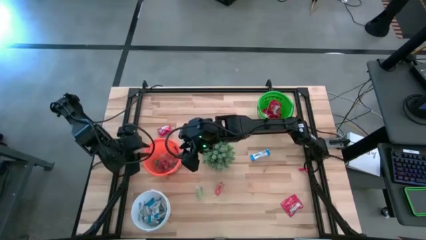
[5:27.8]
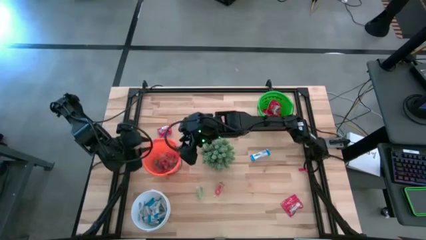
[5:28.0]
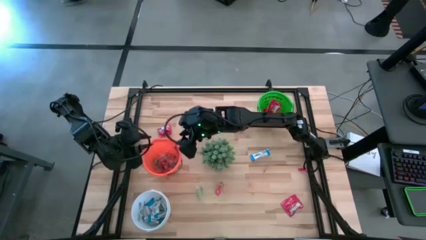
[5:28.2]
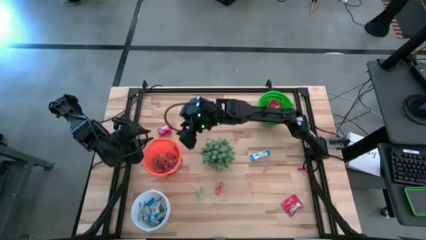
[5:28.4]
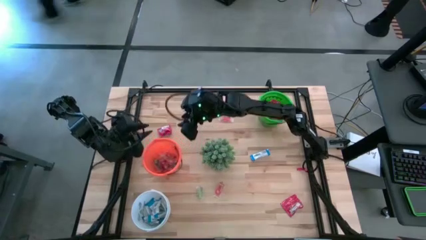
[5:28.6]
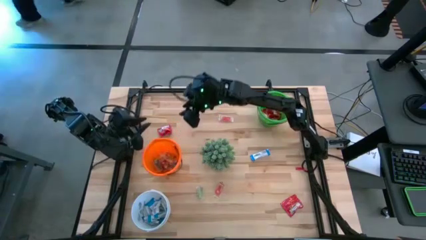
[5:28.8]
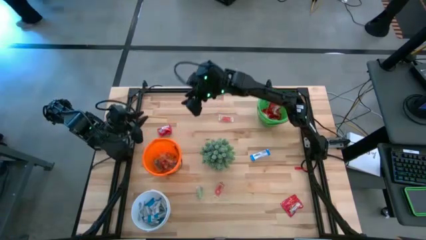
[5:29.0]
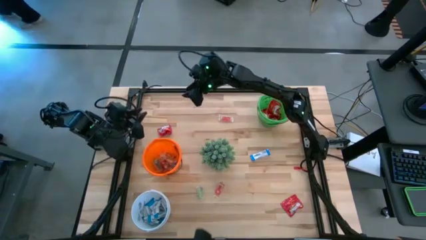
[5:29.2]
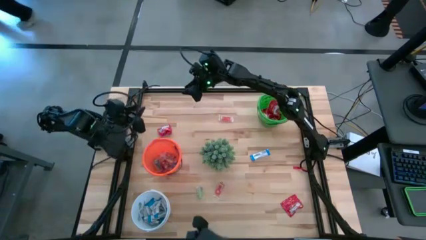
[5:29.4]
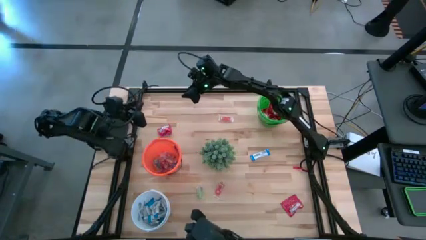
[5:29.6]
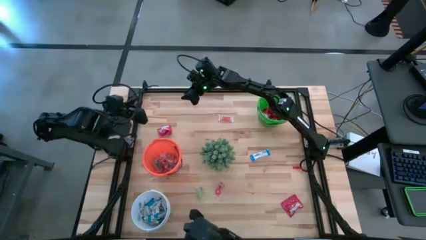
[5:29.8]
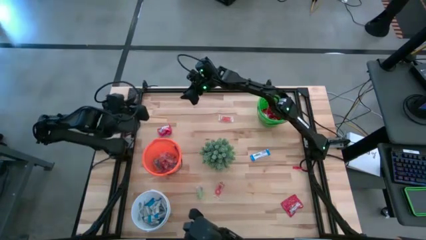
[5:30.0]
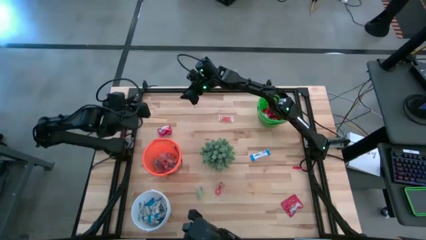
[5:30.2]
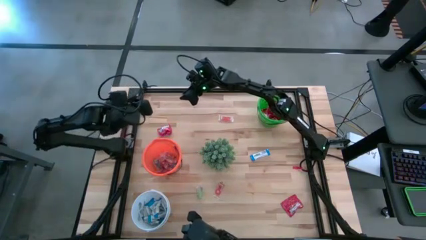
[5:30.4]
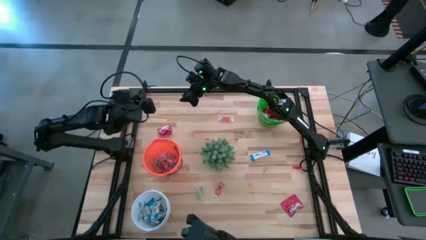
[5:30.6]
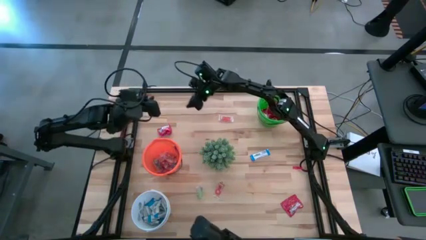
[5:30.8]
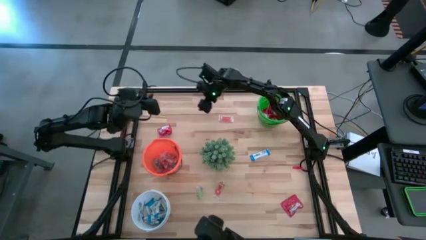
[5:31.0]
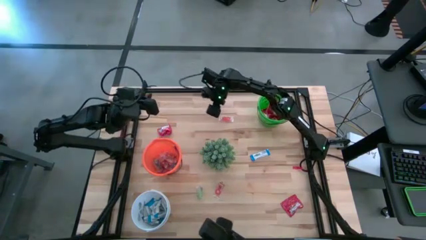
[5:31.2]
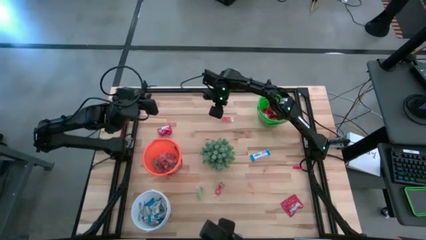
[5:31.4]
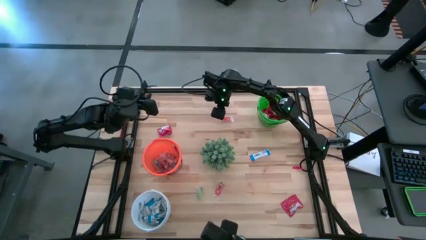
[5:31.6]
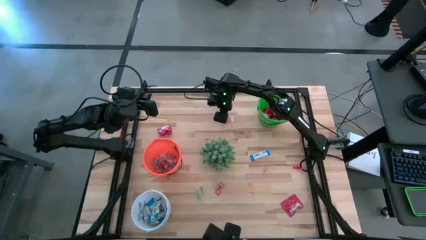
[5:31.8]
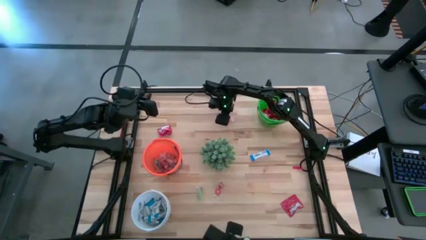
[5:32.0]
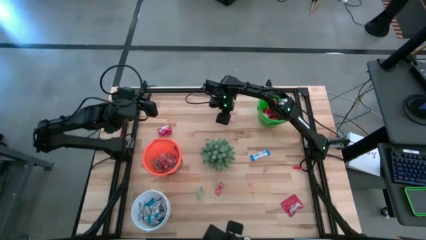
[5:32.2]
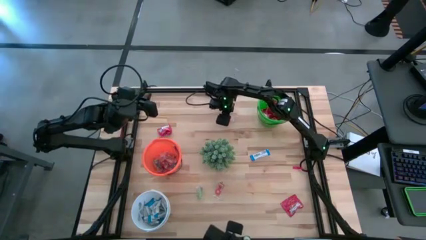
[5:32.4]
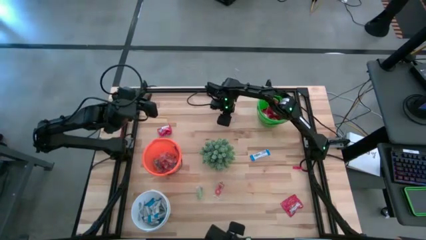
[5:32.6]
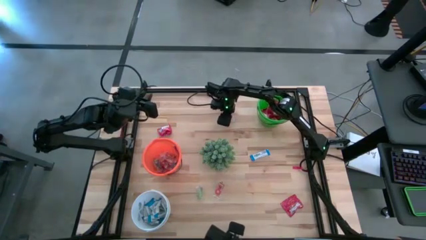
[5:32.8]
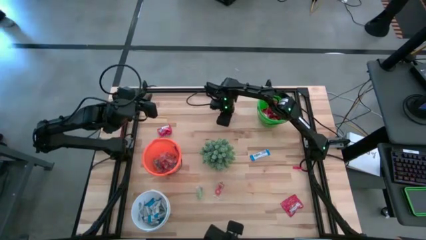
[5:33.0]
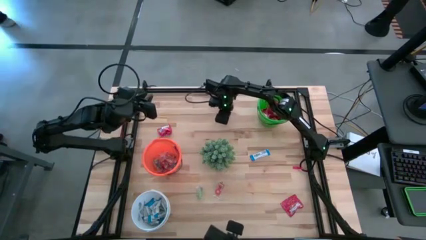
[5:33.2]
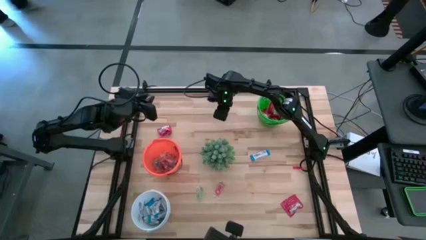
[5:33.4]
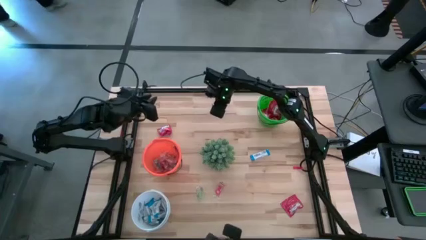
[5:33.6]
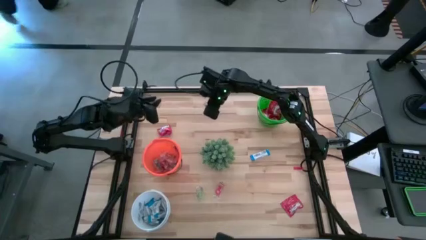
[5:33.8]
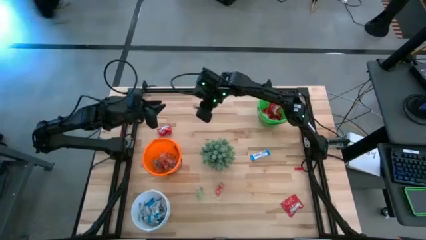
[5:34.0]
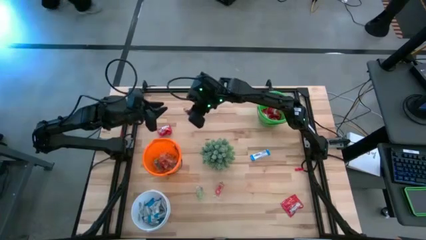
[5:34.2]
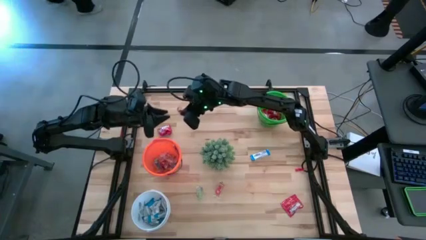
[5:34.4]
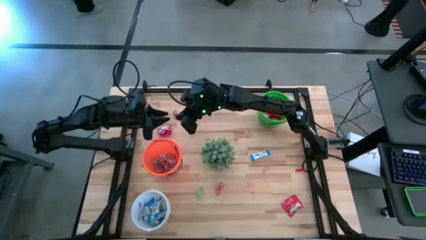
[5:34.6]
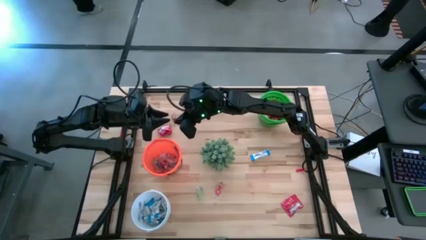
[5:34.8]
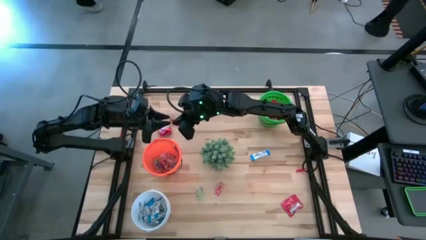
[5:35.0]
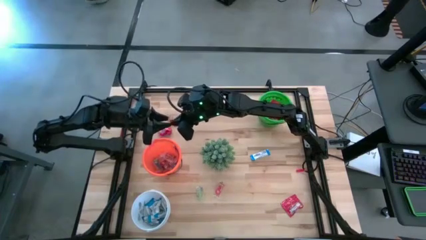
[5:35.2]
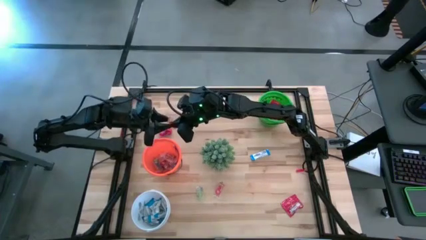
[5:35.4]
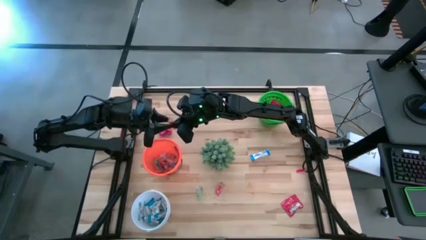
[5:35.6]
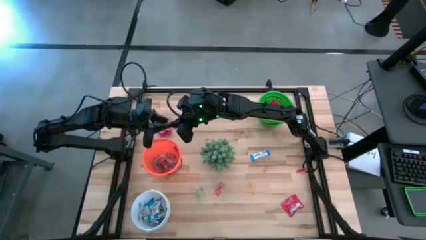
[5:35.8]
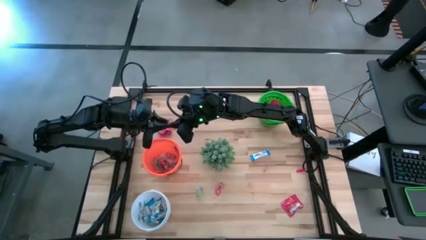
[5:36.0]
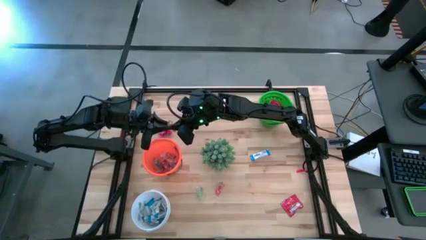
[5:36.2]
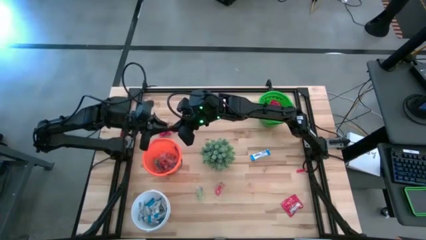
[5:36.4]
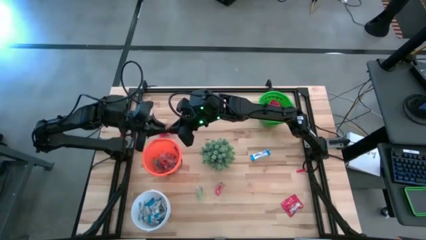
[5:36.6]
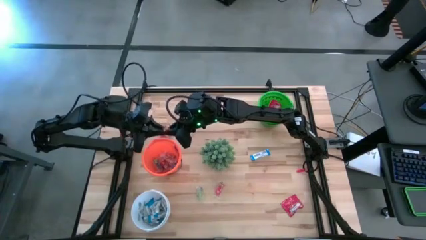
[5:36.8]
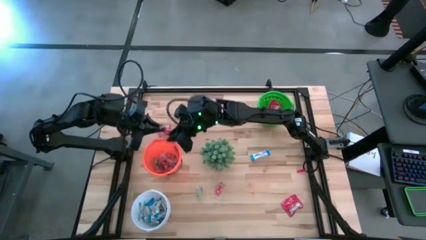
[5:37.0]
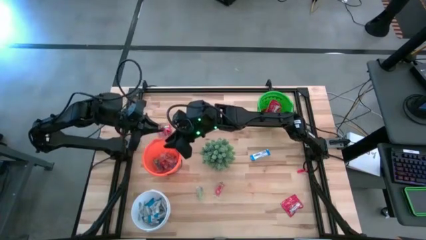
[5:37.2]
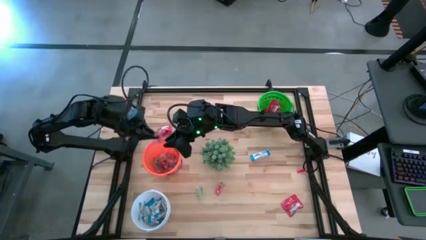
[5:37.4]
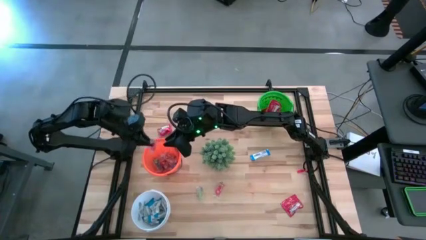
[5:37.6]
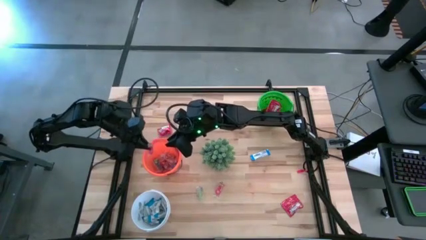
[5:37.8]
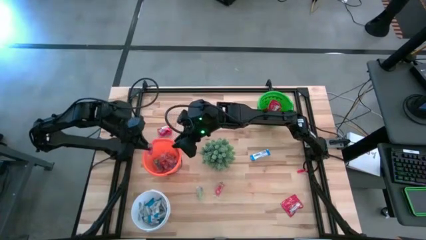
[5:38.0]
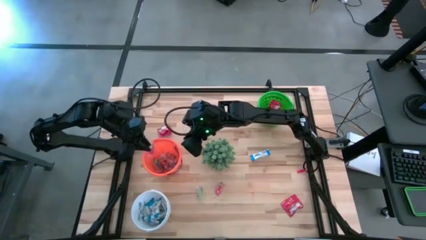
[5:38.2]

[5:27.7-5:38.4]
Task: Sort candy
Put the red gummy into the orange bucket

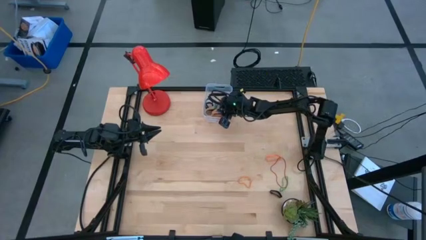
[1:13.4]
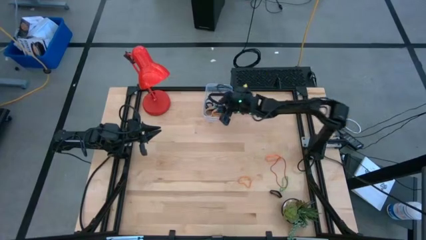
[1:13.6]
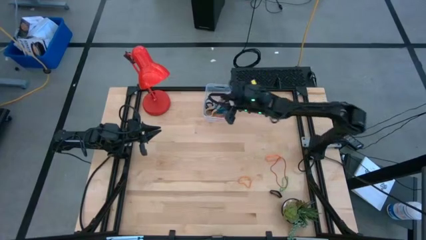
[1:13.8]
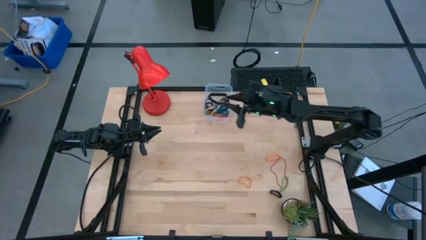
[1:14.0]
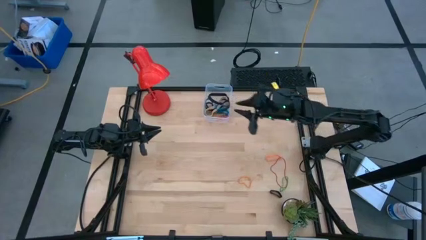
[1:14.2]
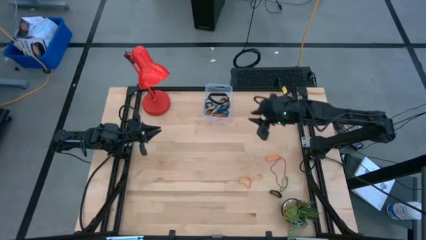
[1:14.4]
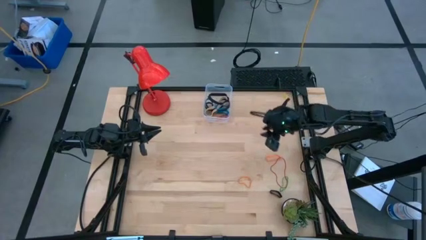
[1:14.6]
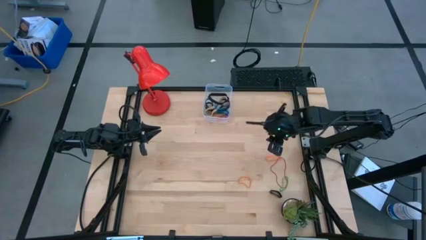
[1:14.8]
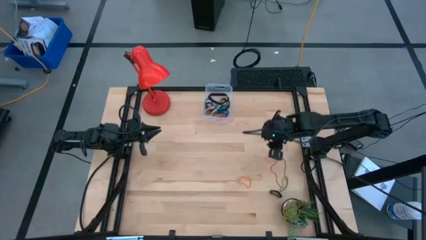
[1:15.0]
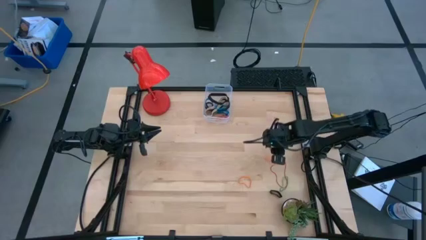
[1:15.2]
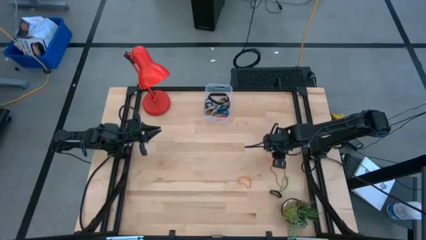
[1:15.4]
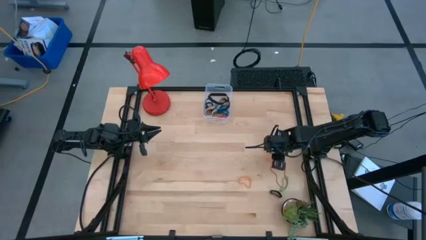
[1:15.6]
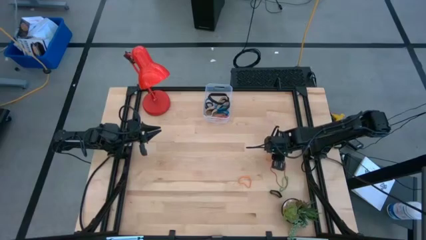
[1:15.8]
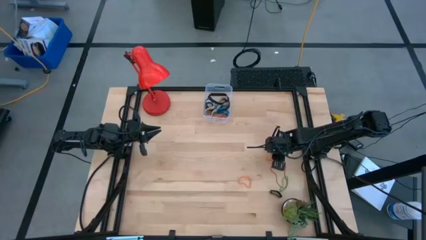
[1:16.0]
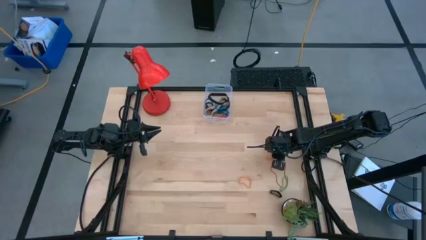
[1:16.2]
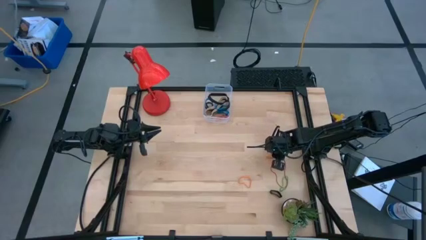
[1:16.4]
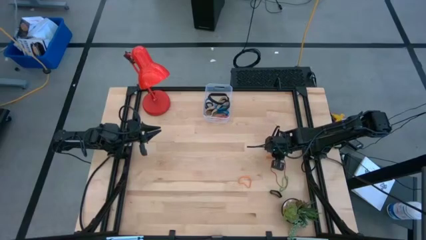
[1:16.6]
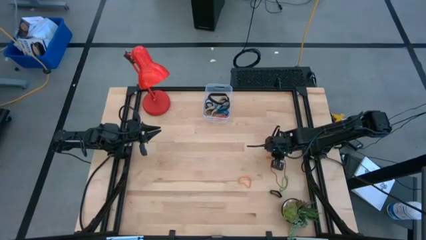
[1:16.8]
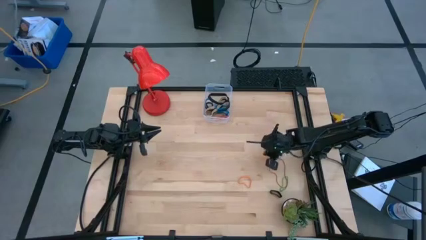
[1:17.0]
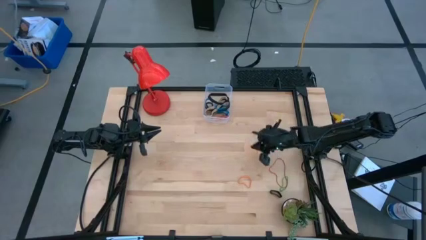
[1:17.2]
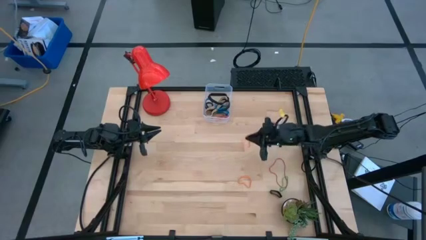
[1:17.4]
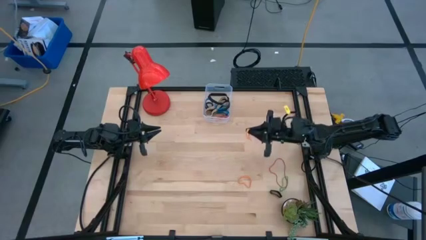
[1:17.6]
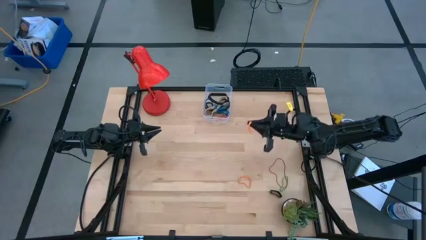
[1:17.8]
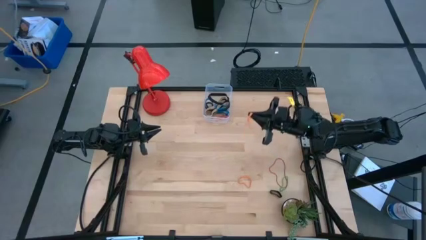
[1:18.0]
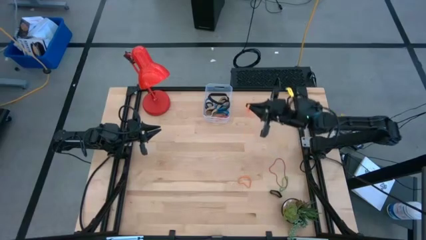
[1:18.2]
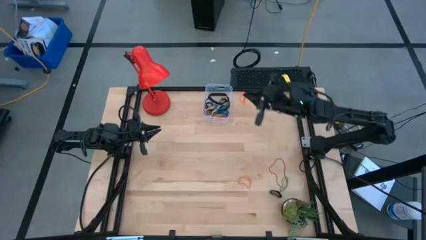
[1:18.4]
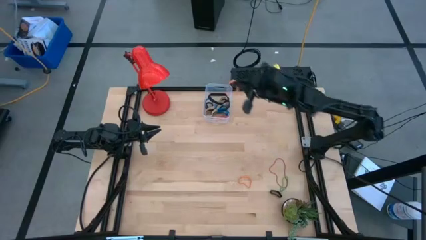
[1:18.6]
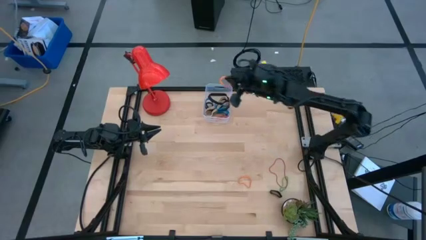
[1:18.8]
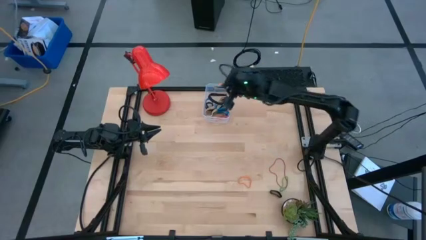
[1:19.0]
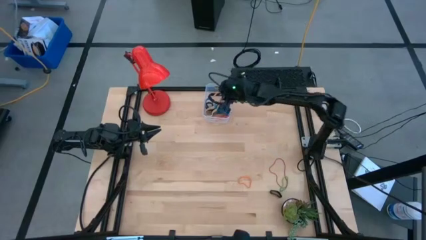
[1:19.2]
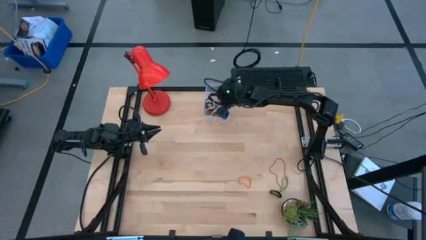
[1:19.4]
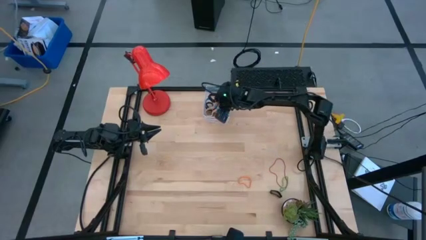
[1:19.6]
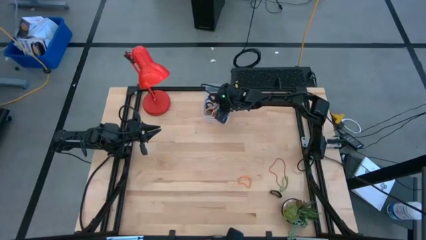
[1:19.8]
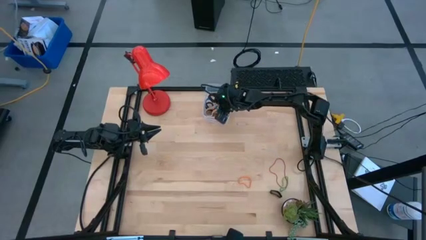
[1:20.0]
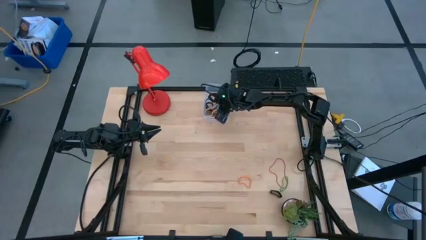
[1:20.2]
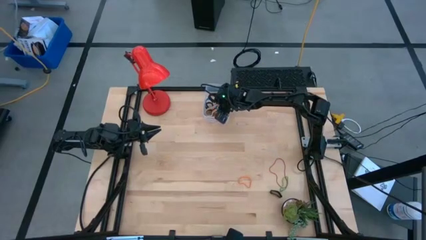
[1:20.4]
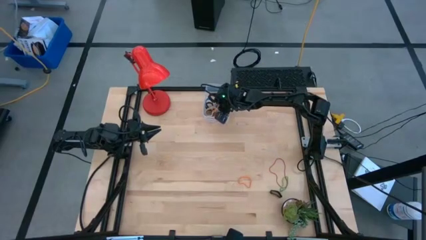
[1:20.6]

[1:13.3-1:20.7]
Task: Pick and place rubber bands into bin
Put the orange rubber band into the transparent bin
